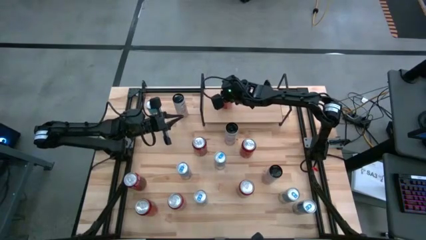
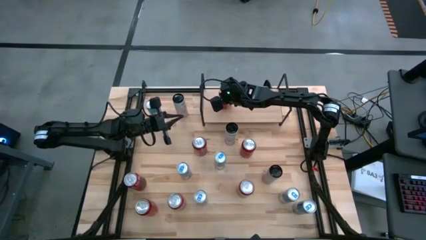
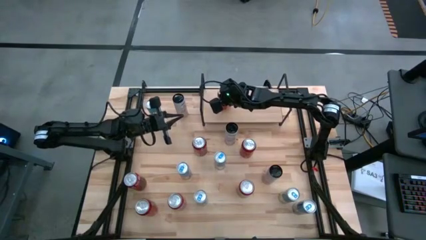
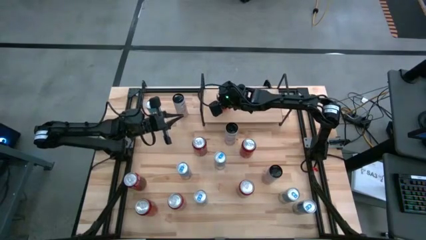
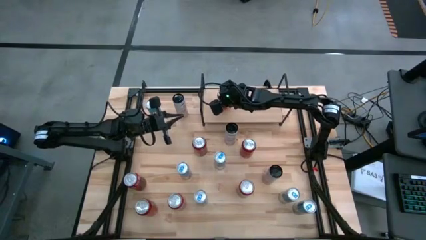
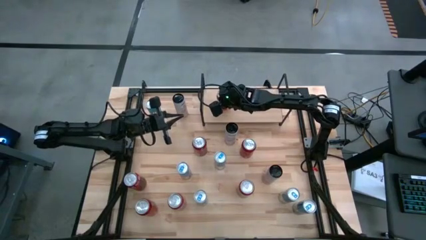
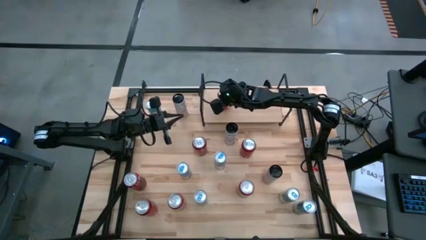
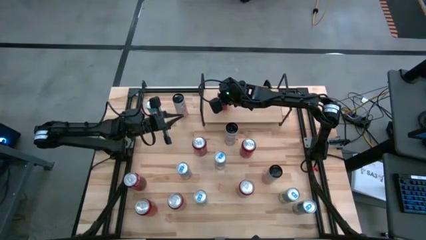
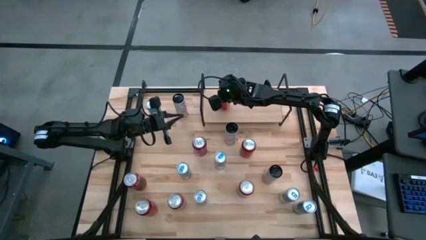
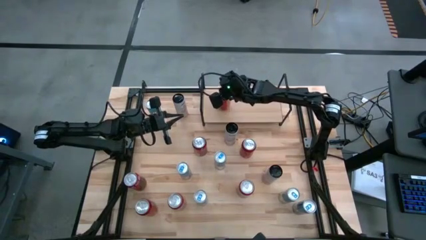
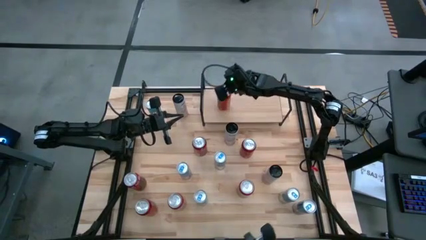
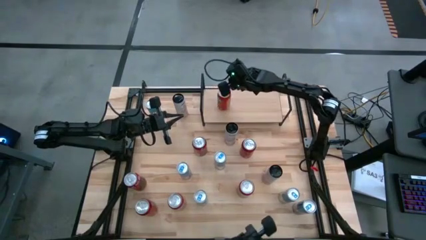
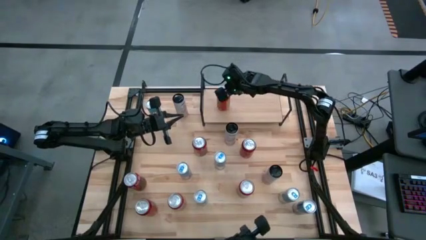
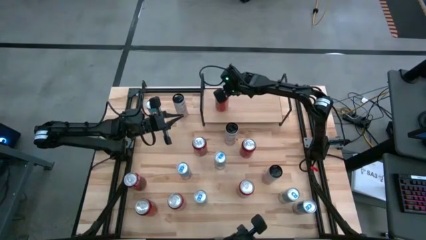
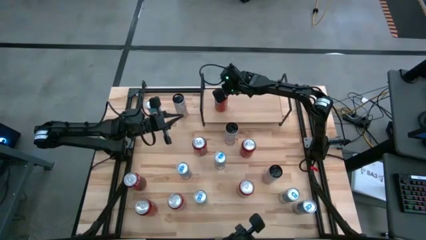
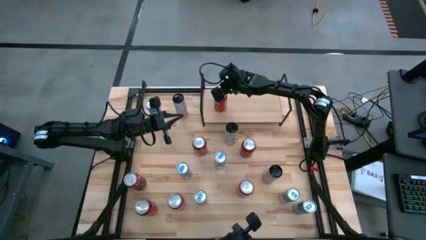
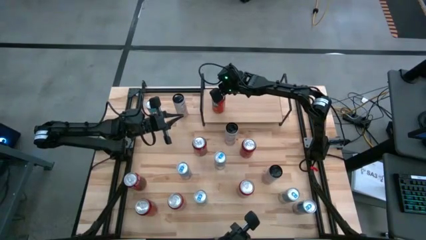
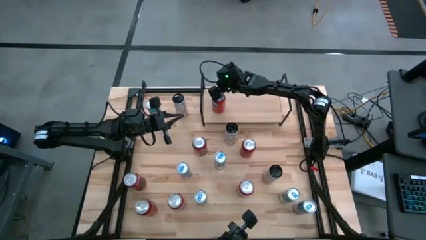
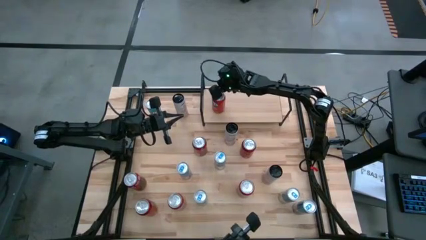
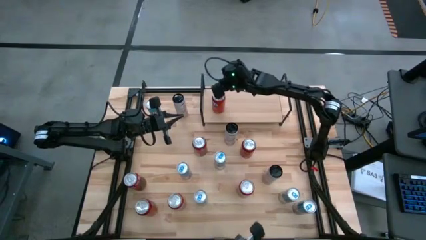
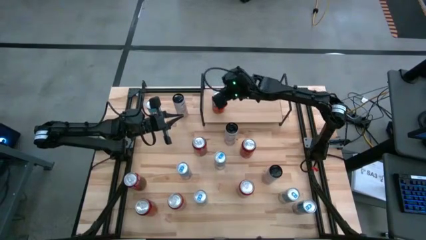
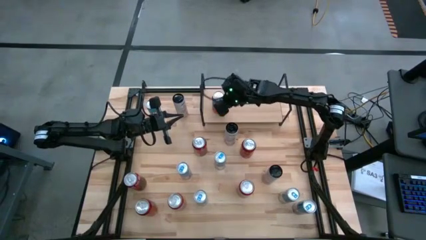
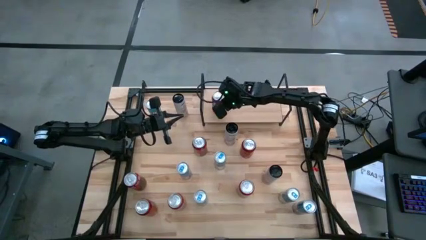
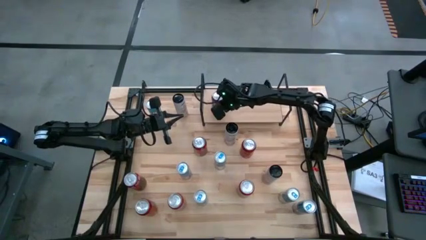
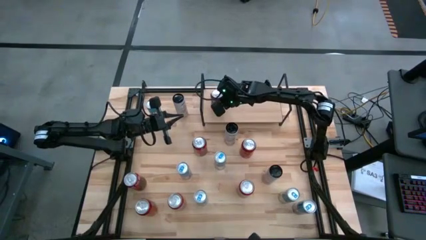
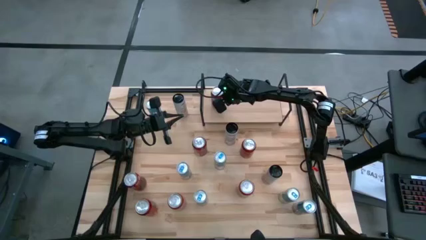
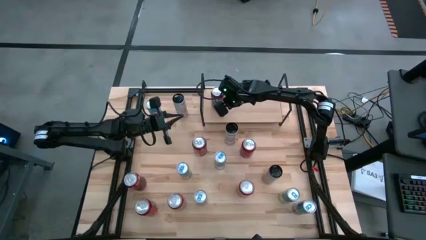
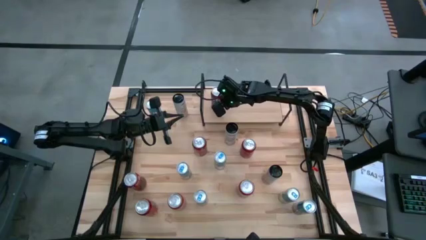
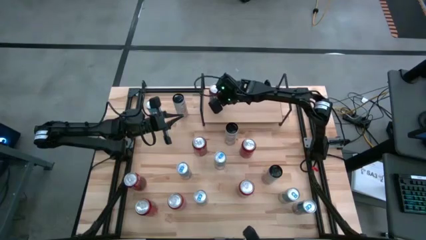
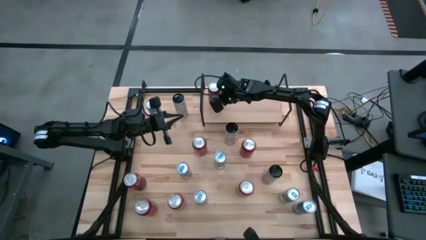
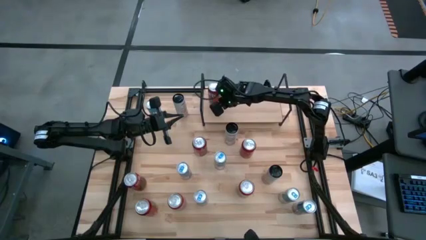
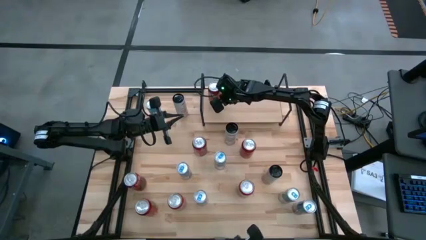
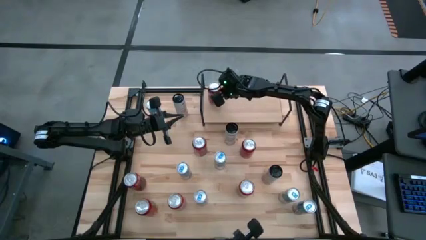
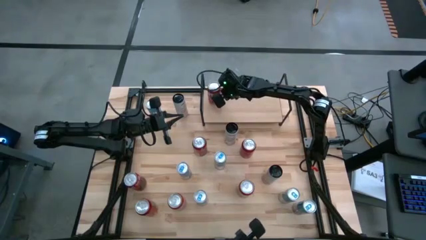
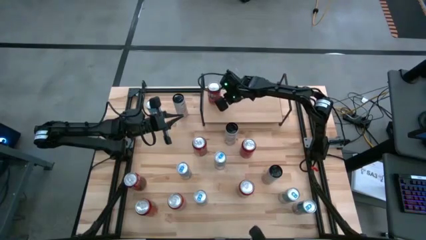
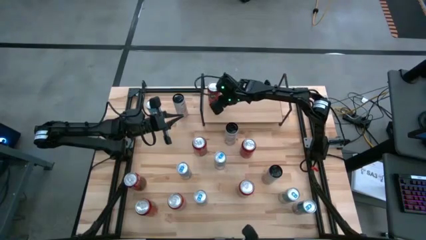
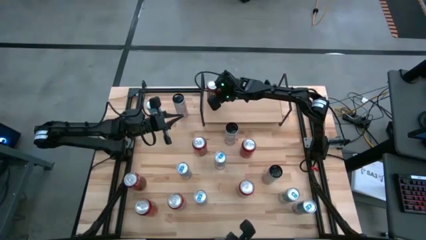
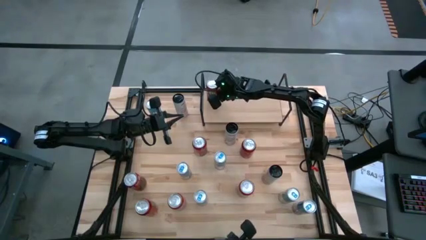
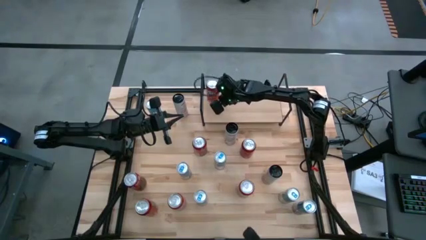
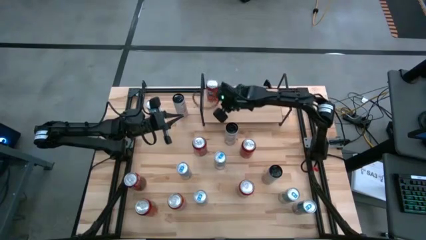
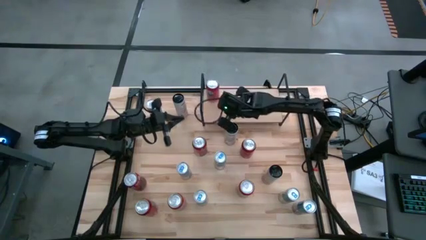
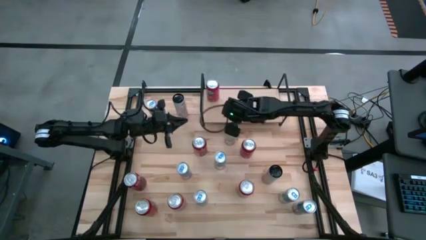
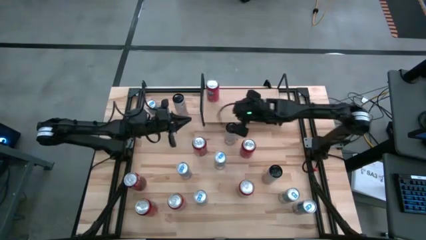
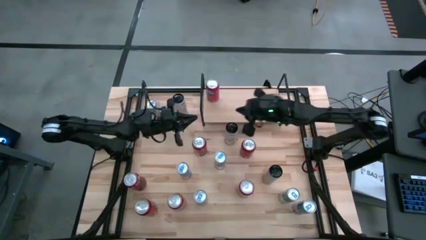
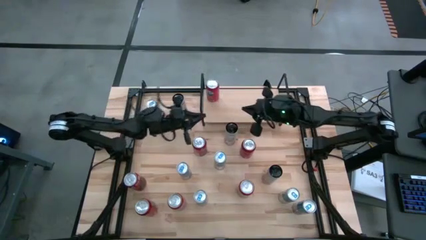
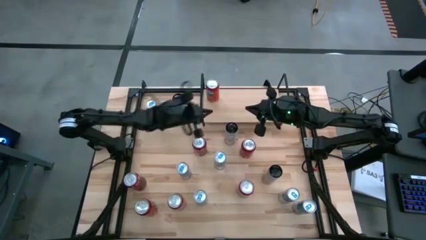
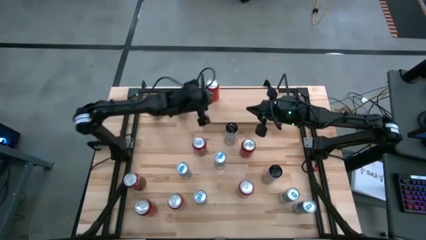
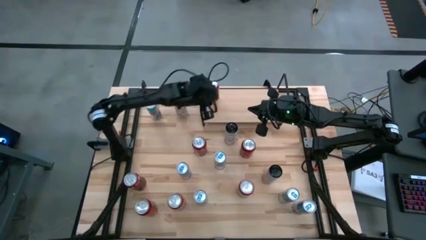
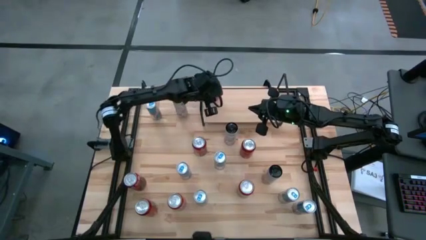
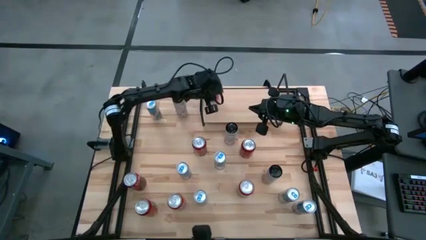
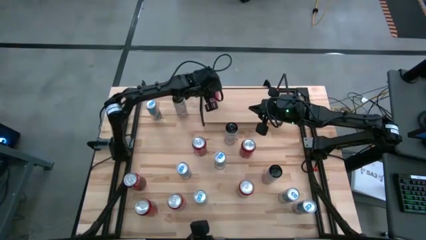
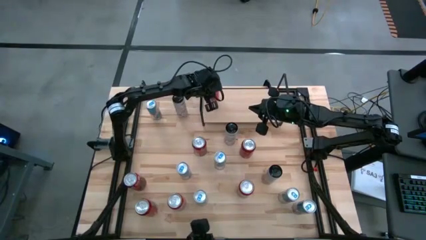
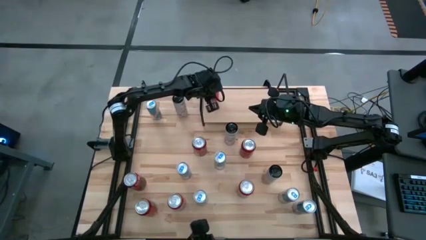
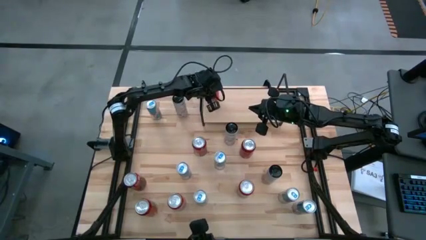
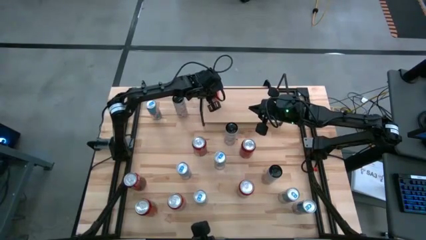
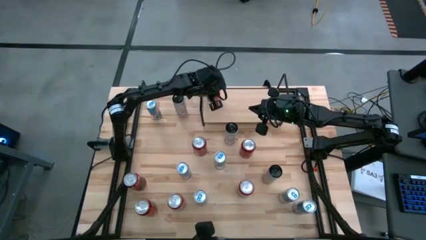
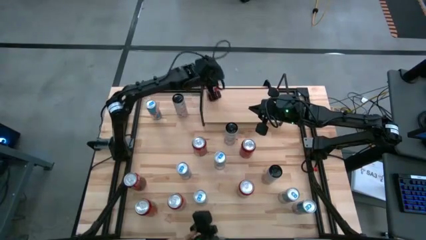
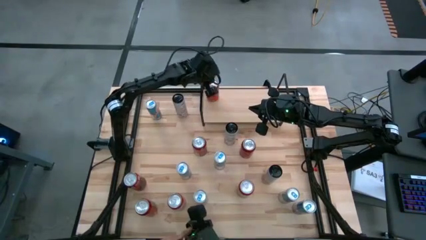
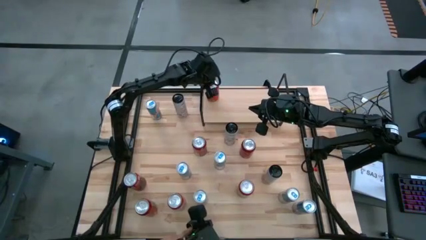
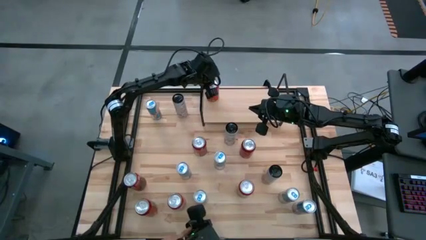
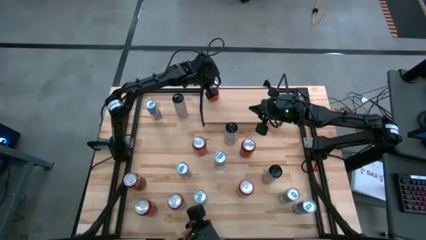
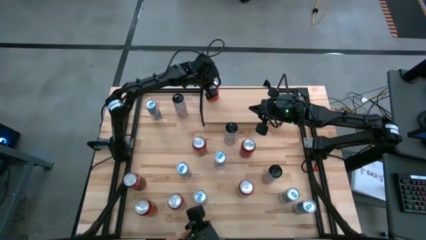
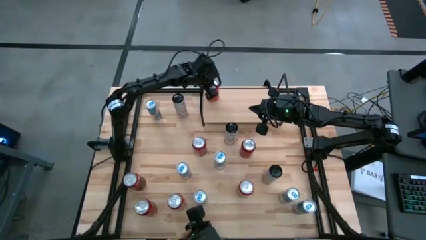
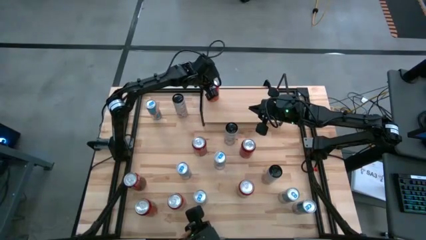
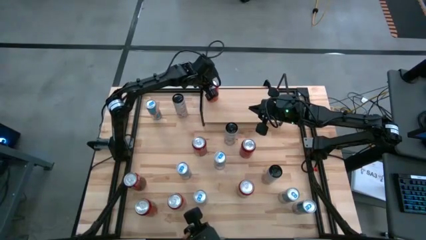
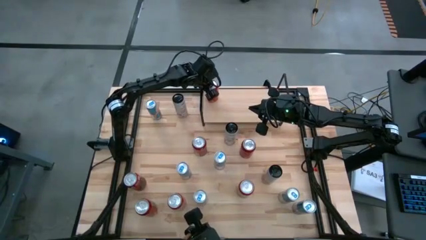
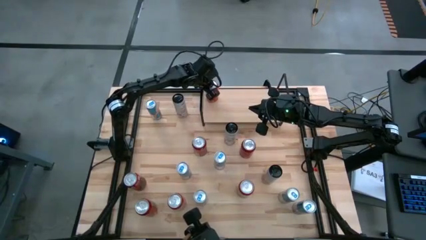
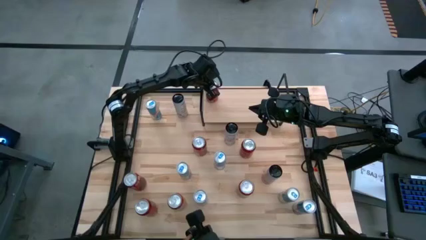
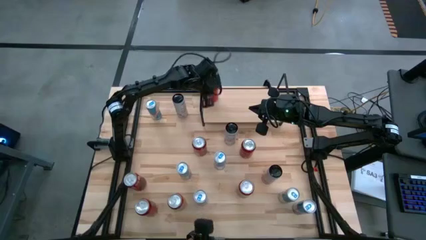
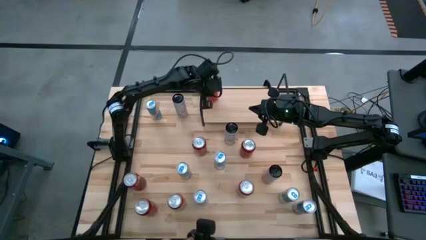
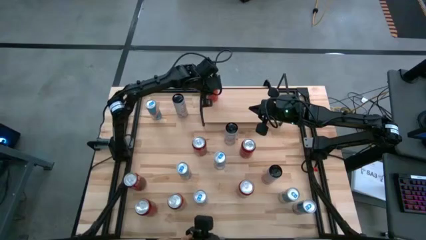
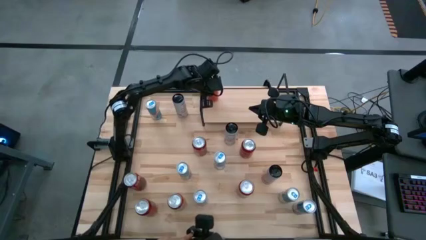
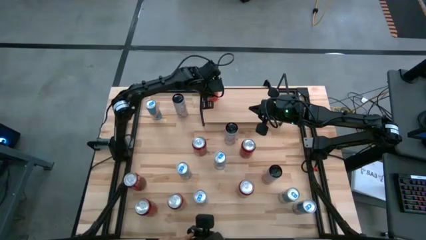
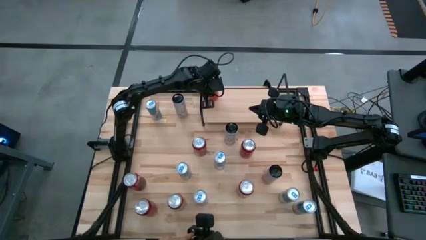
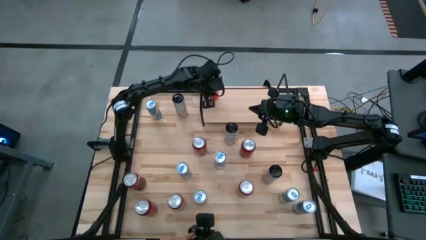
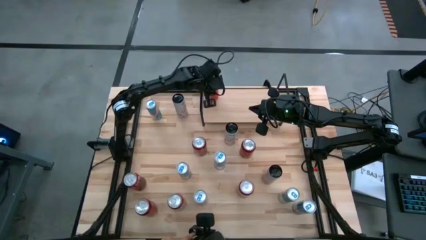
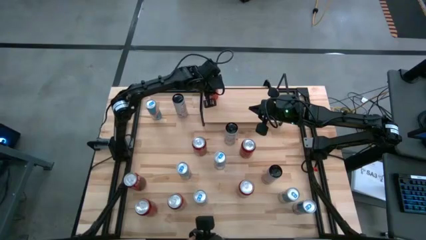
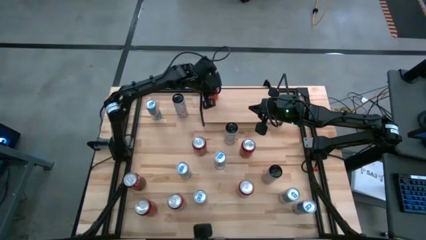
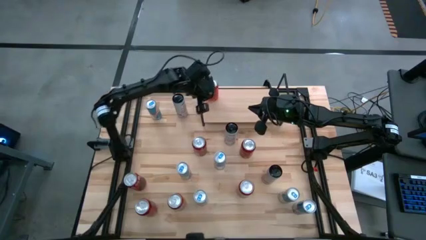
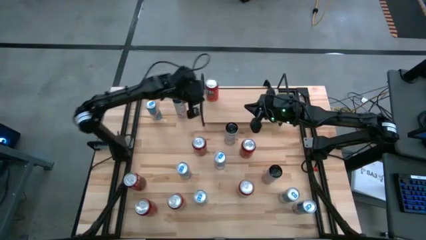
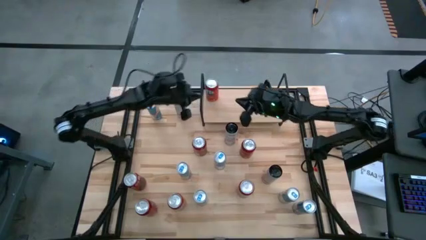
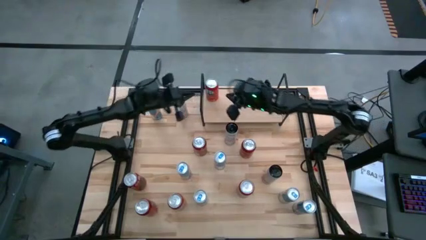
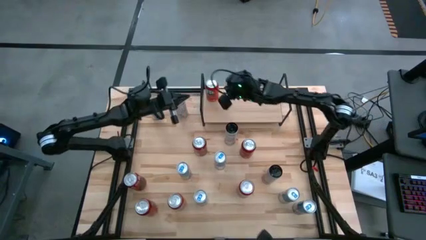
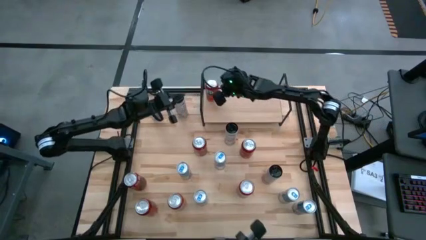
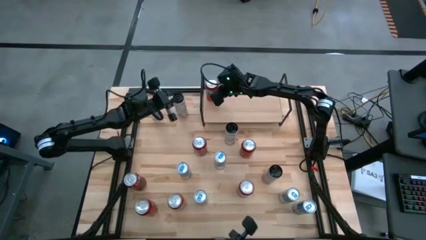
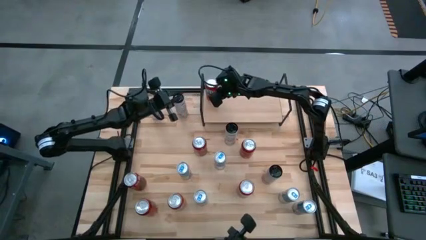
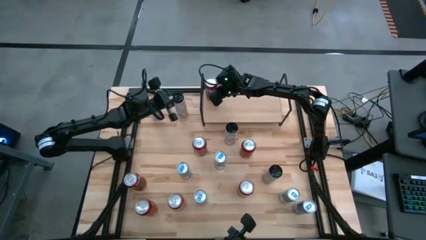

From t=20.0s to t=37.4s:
Task: Place canned beverage on shelf
Put the orange soda can on the shelf
